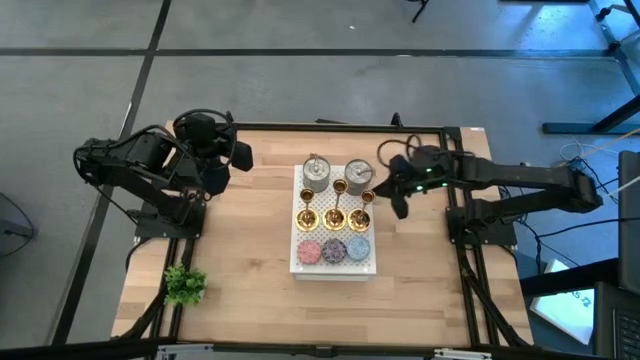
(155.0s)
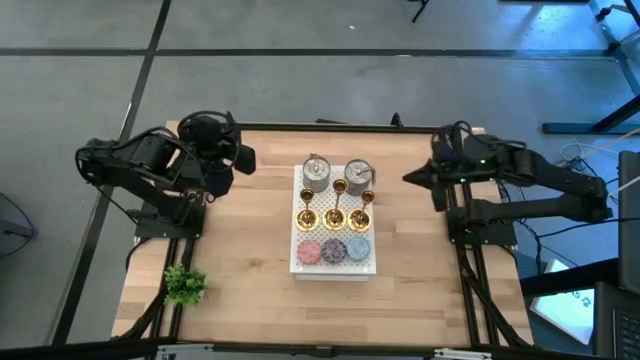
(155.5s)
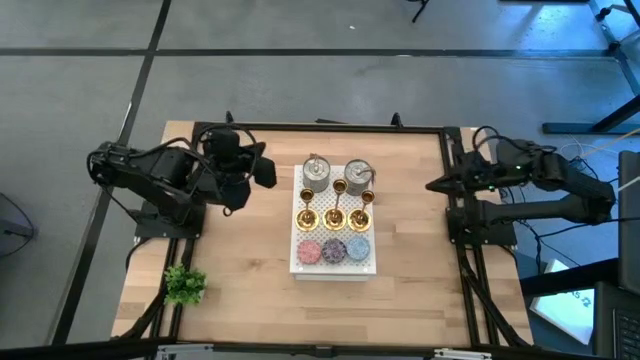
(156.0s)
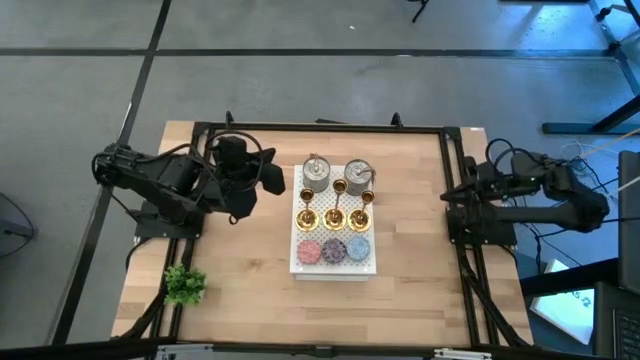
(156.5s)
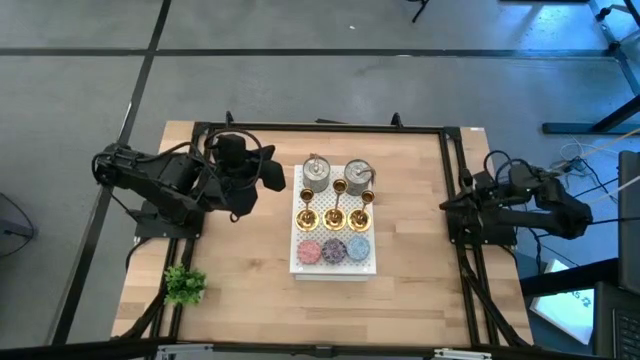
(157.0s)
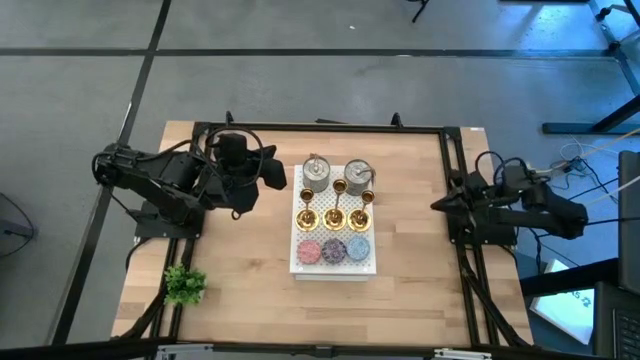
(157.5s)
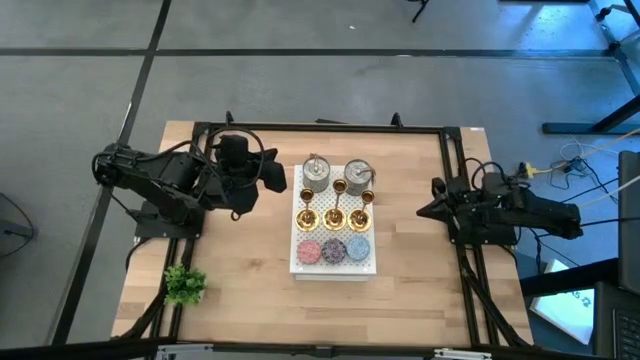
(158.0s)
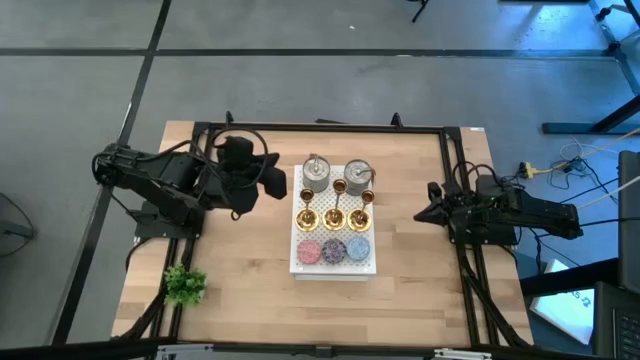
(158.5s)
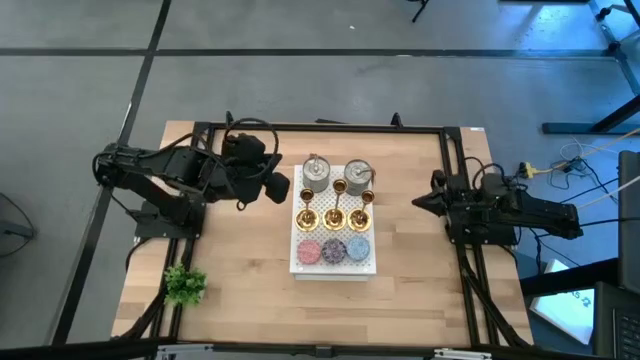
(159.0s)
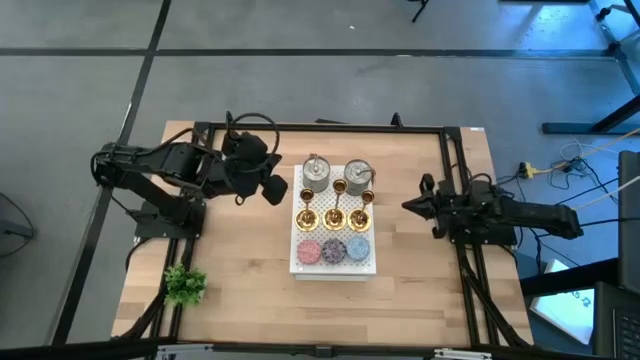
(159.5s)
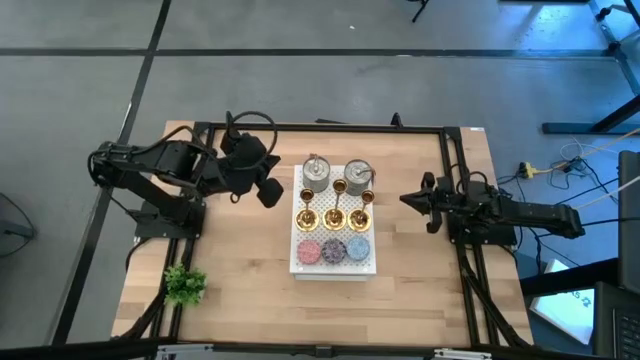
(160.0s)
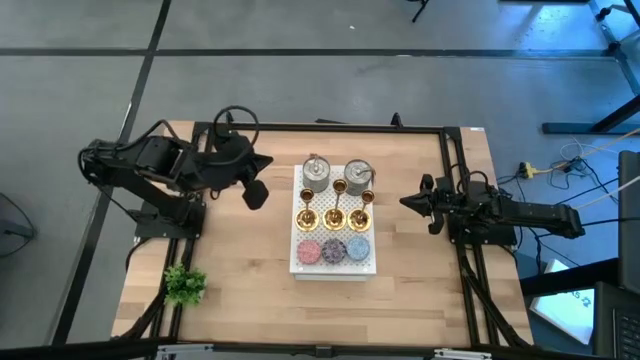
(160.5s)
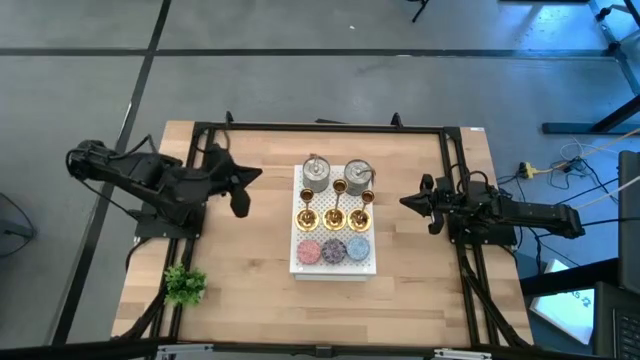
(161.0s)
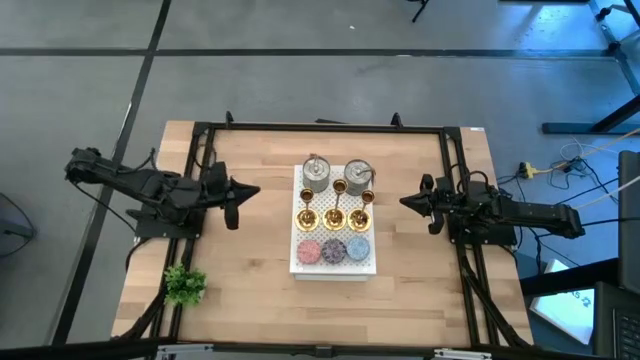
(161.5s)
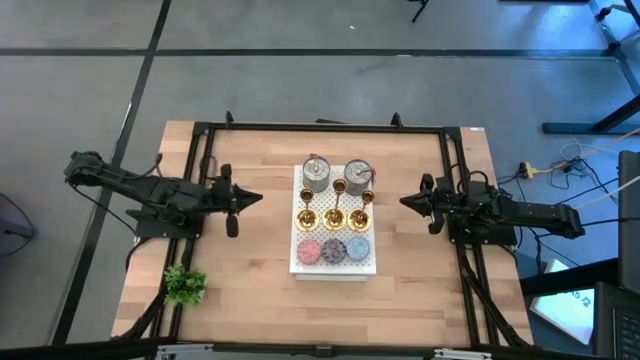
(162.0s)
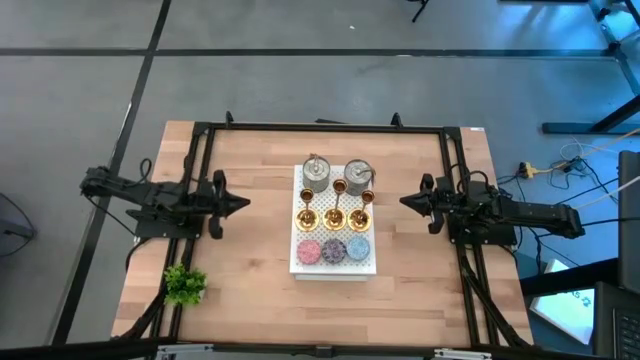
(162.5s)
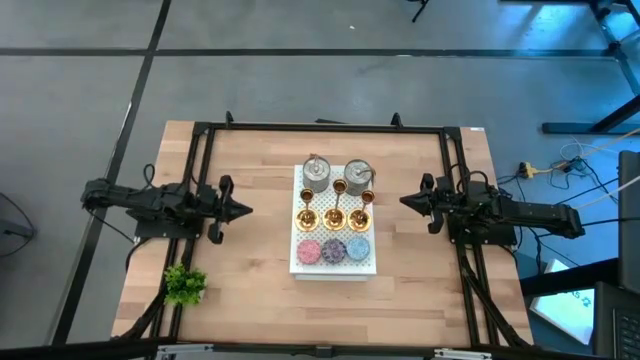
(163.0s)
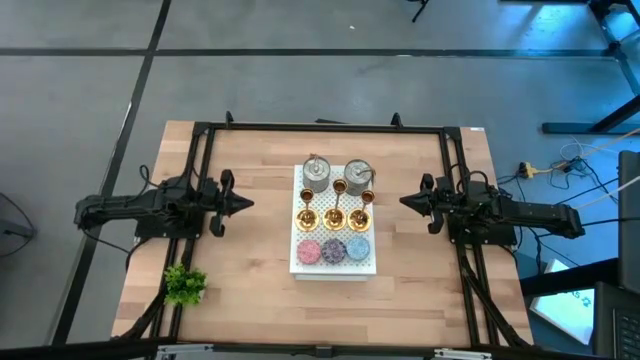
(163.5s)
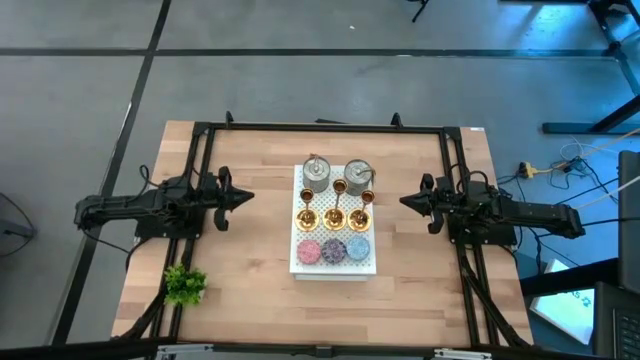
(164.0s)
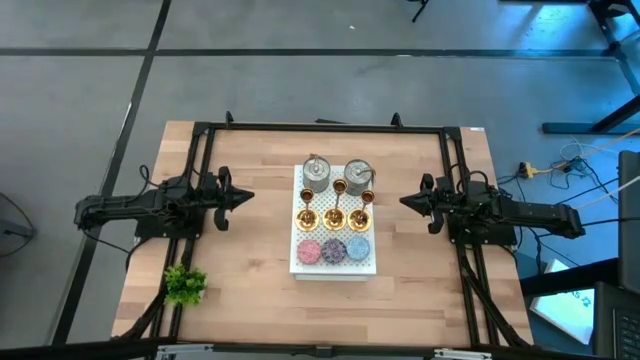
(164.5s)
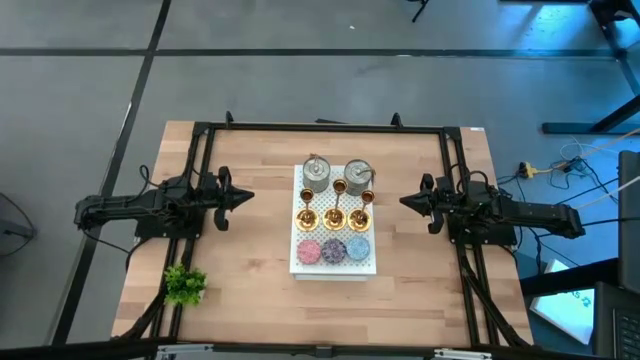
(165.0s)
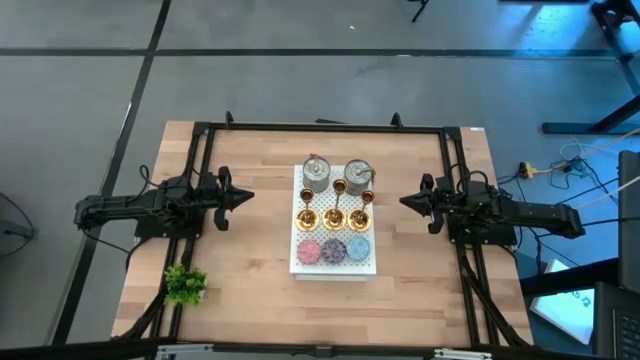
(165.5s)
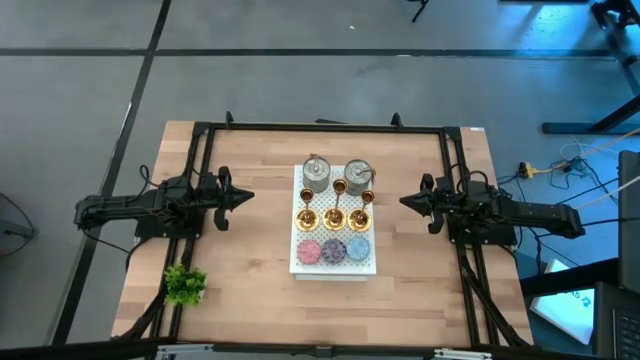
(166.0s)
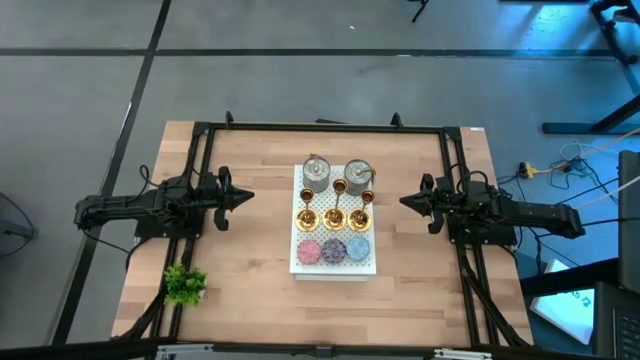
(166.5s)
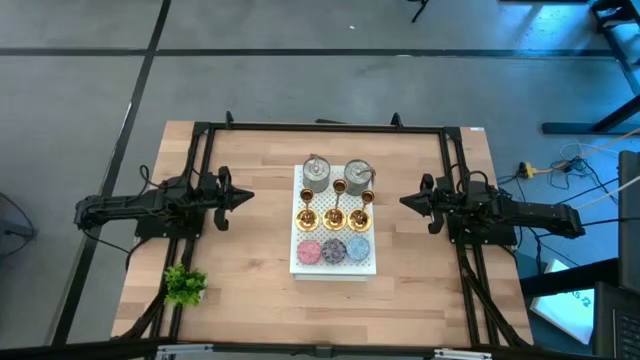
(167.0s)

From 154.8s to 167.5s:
Task: Pick & Place candle stick holders
Return to Home Position

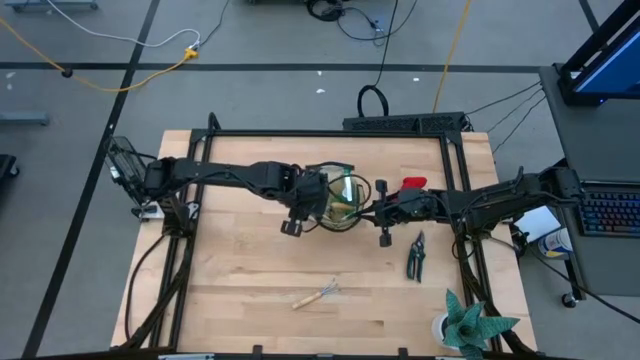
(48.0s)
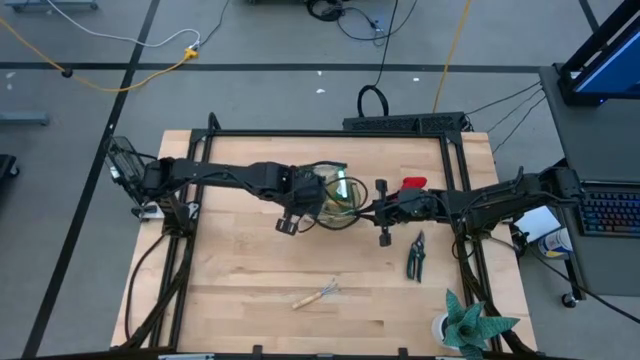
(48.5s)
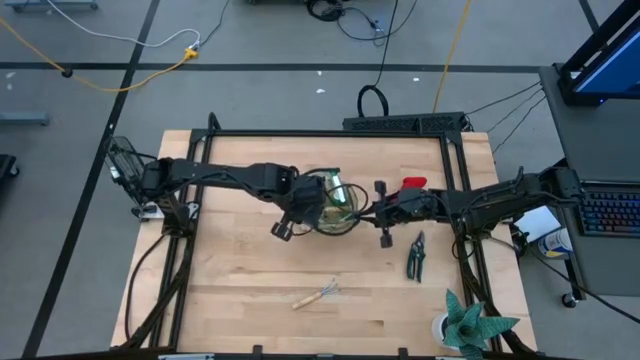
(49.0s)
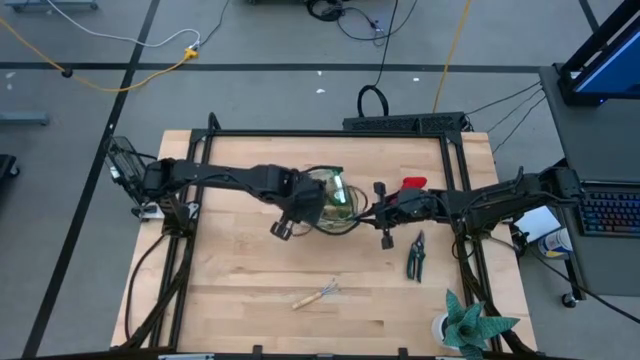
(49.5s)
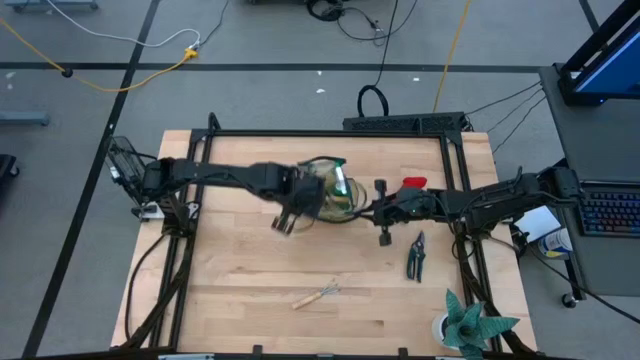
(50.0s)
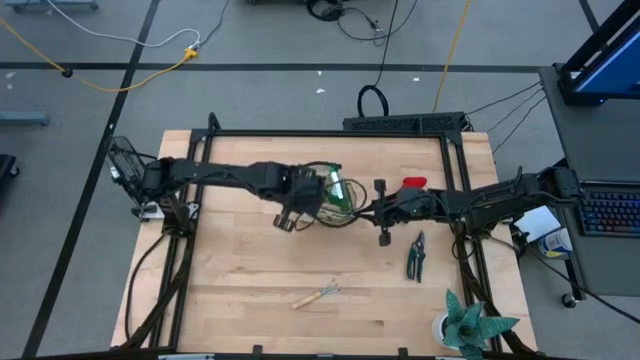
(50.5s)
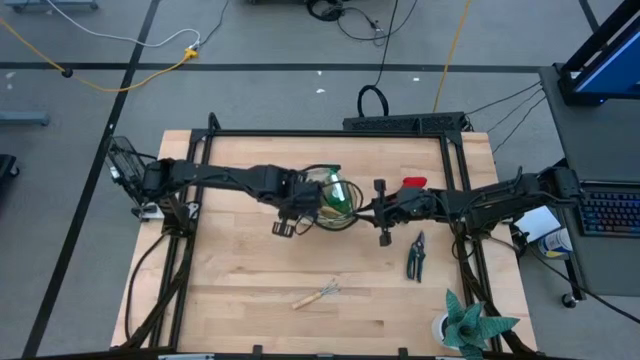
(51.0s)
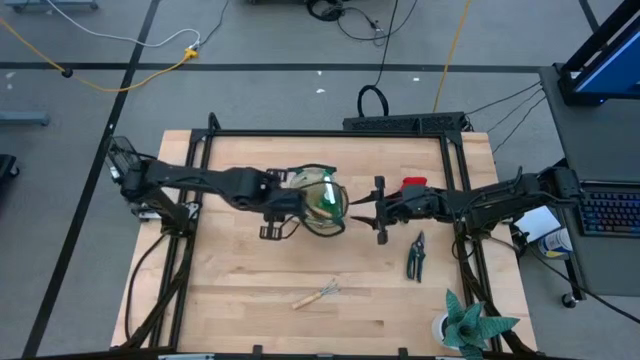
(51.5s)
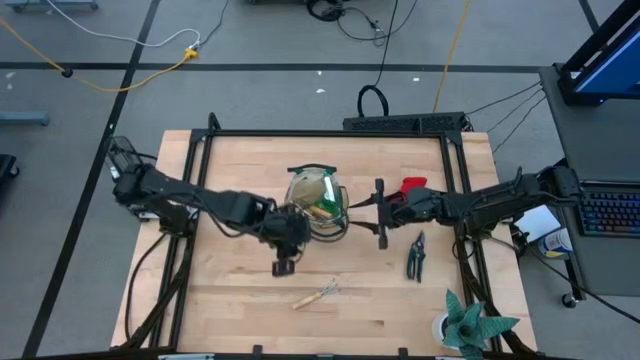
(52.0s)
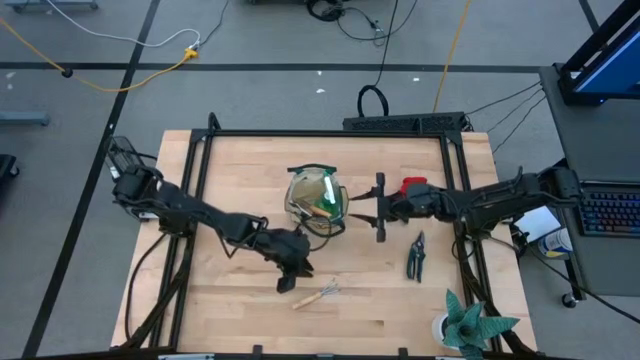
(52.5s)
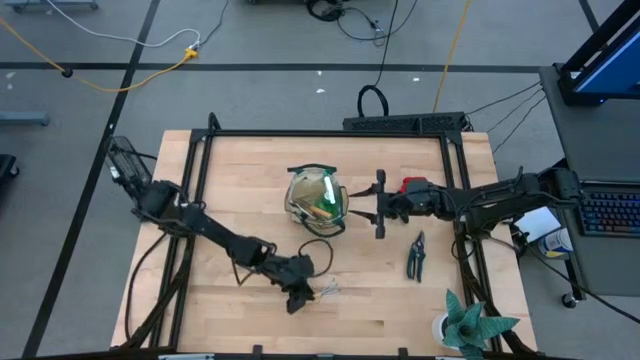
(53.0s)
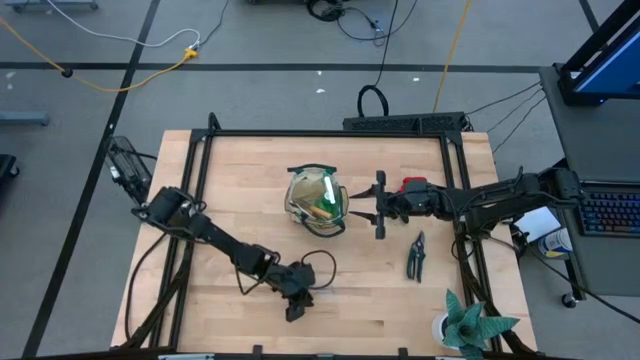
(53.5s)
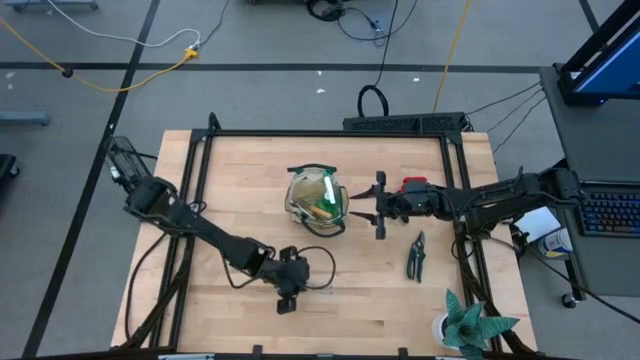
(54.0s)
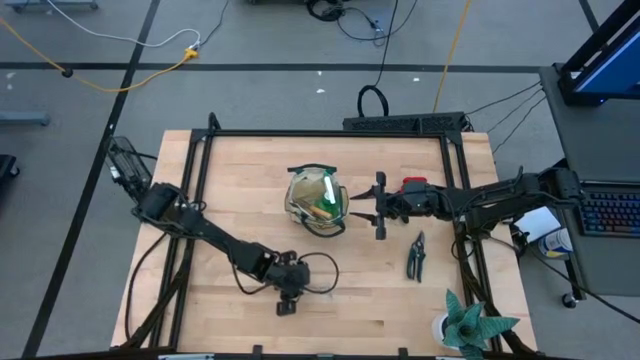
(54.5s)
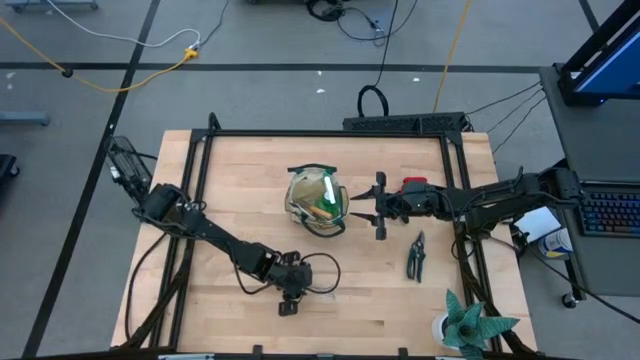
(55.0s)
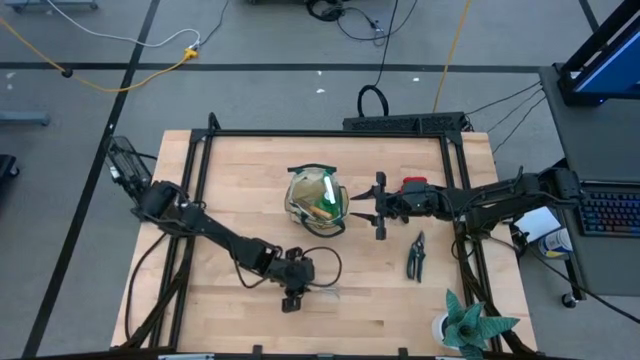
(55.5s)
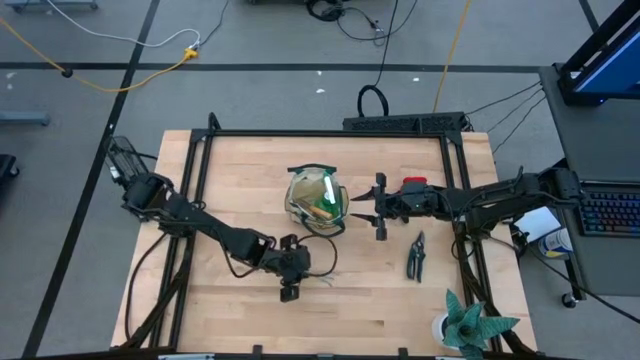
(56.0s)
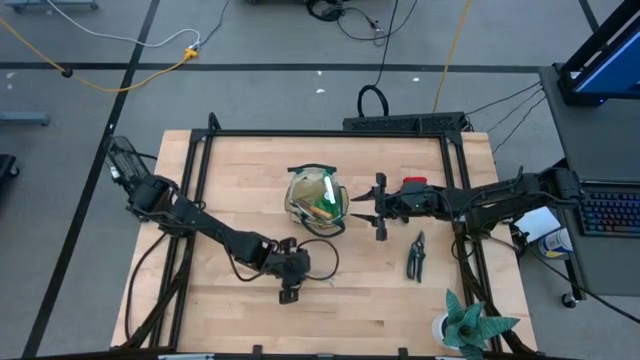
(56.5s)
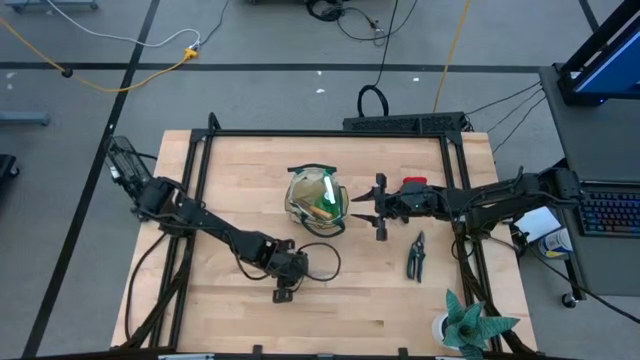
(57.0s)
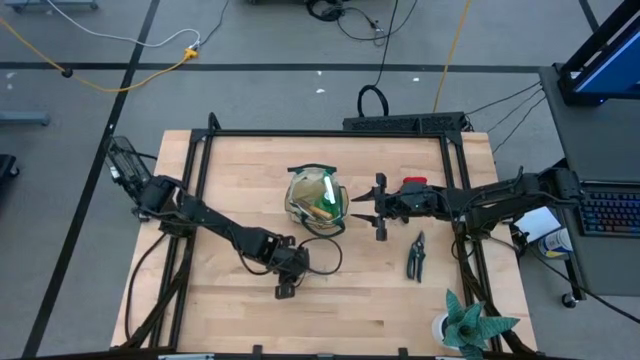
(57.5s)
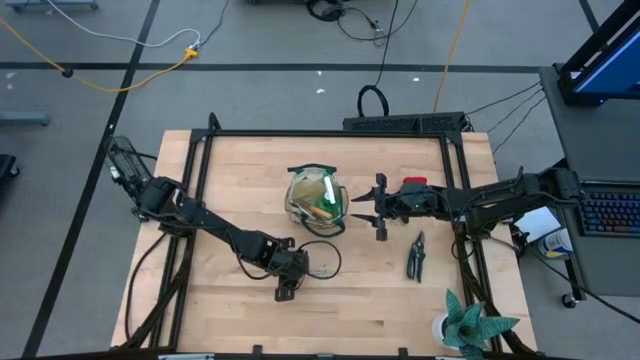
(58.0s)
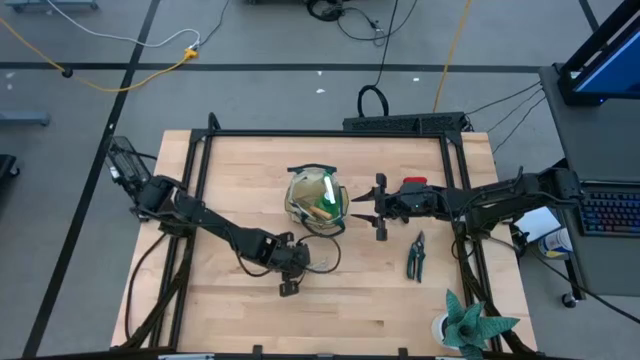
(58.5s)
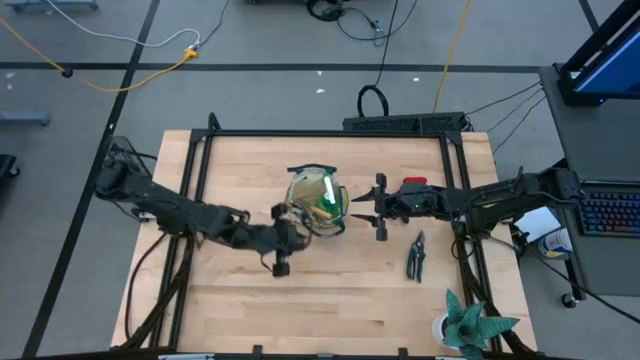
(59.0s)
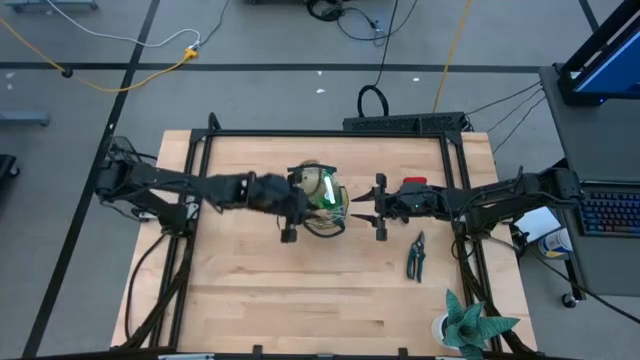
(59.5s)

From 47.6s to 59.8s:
Task: Pick & Place Garden tools in Gardening bag
Put the brown hand rake into the brown gardening bag
